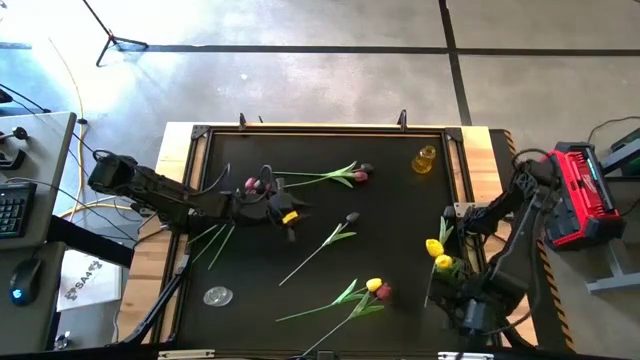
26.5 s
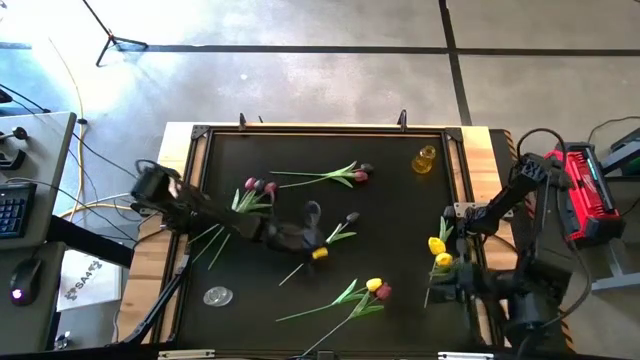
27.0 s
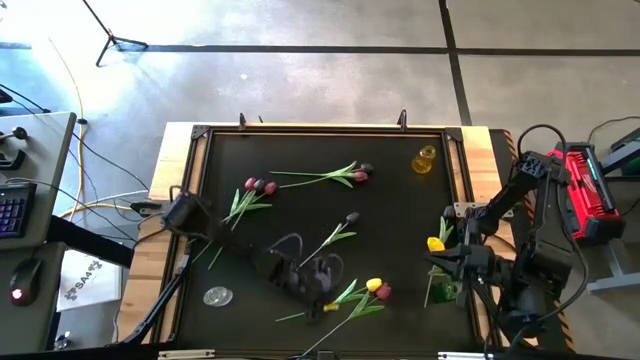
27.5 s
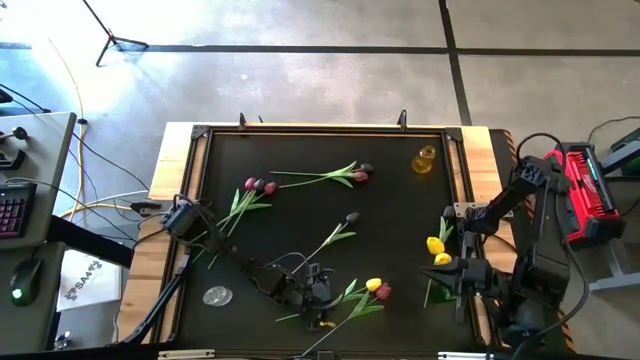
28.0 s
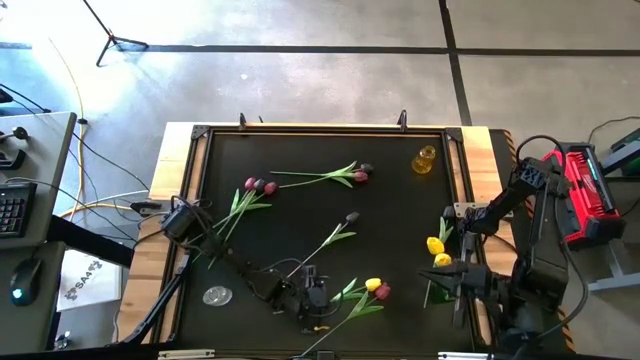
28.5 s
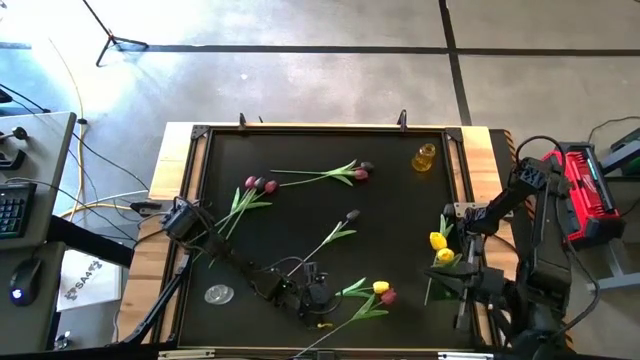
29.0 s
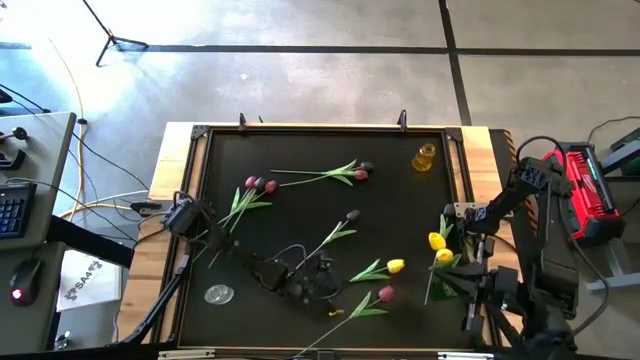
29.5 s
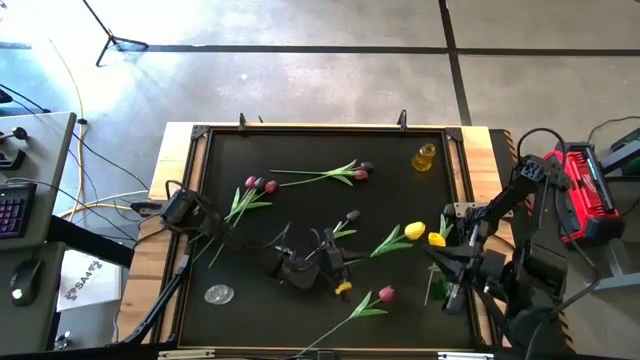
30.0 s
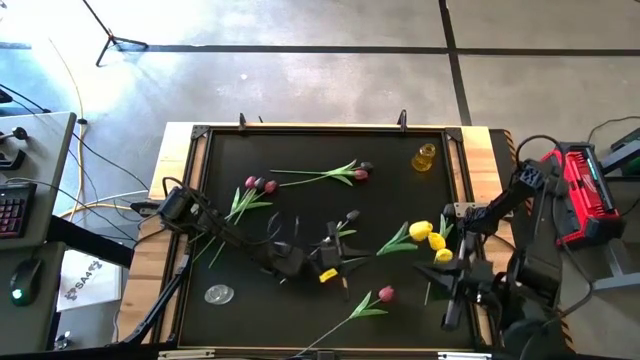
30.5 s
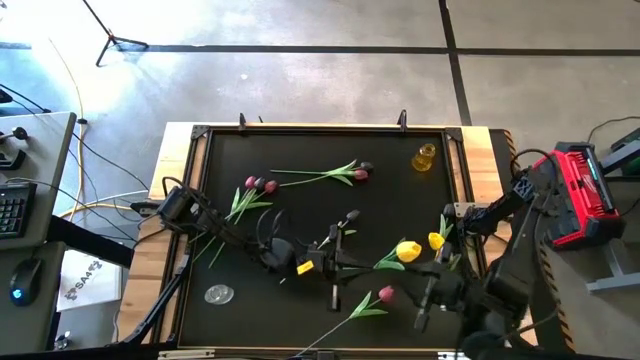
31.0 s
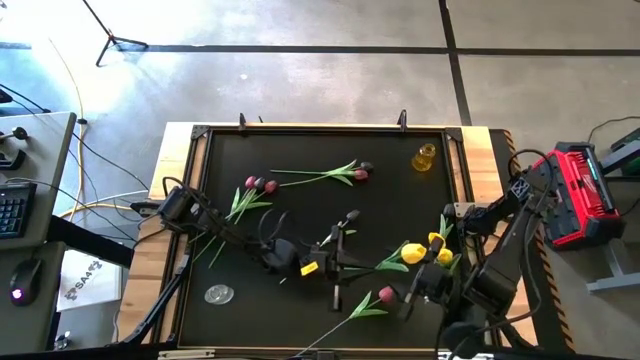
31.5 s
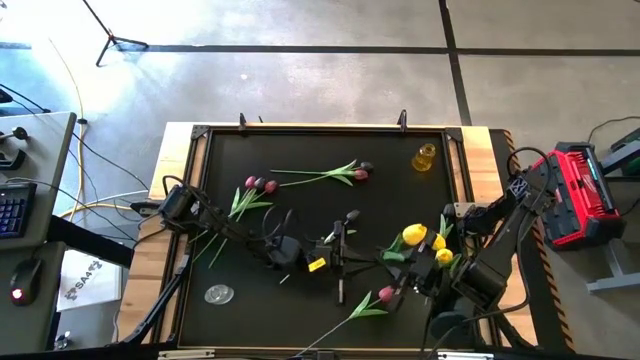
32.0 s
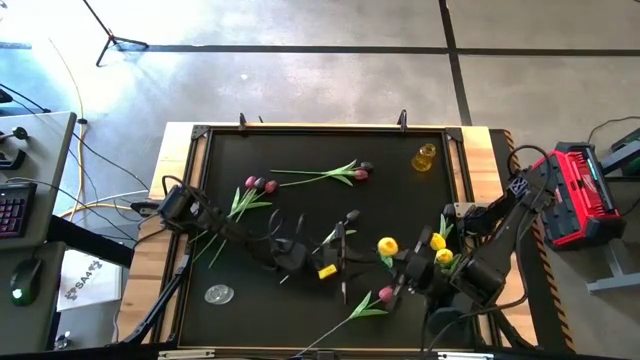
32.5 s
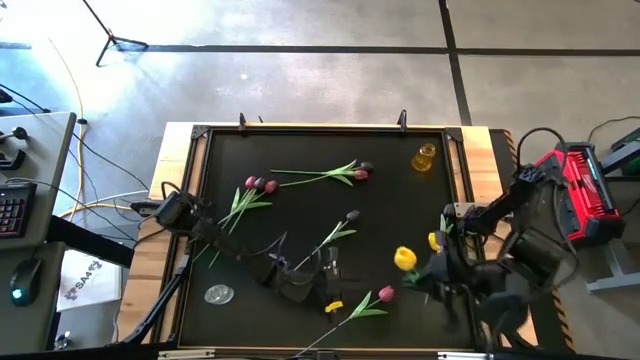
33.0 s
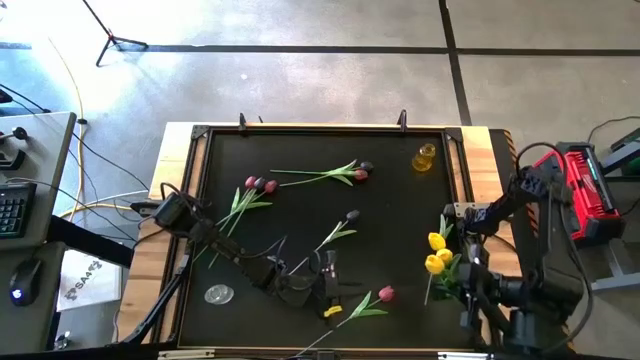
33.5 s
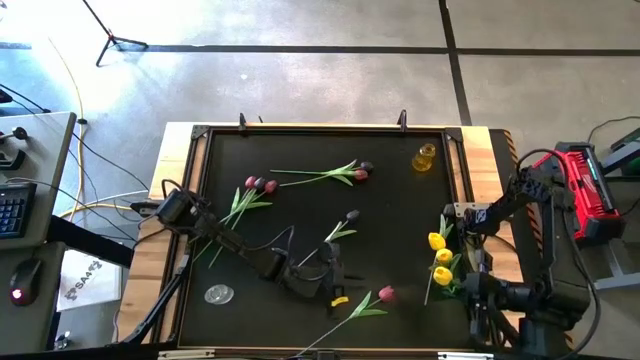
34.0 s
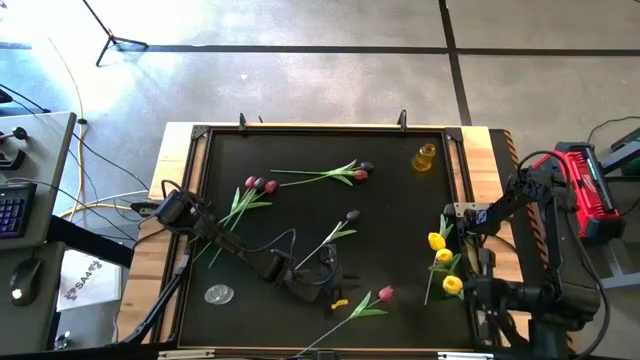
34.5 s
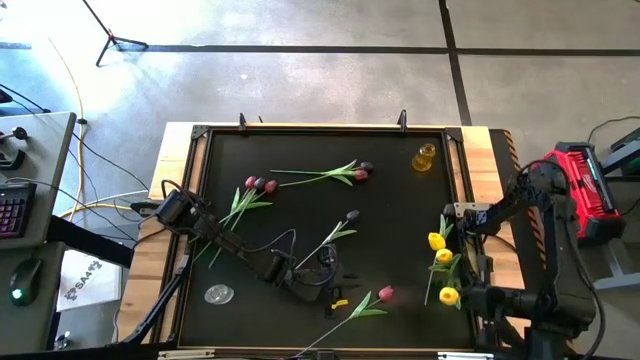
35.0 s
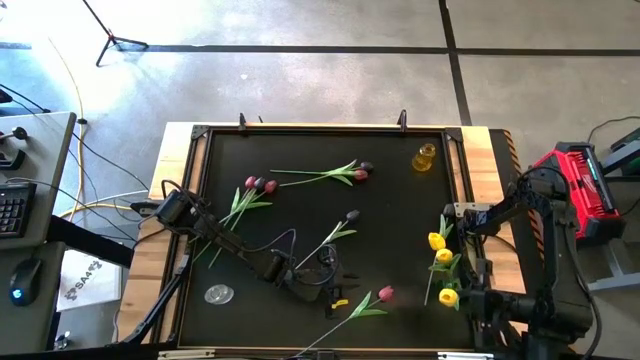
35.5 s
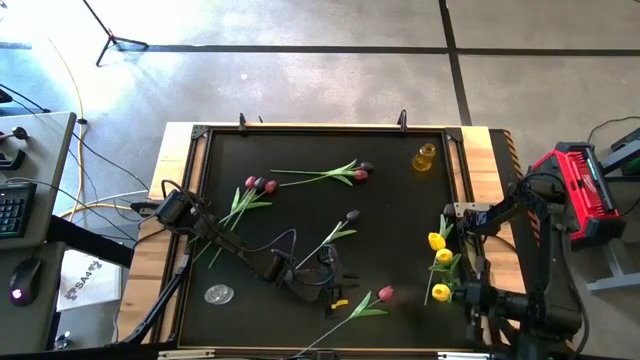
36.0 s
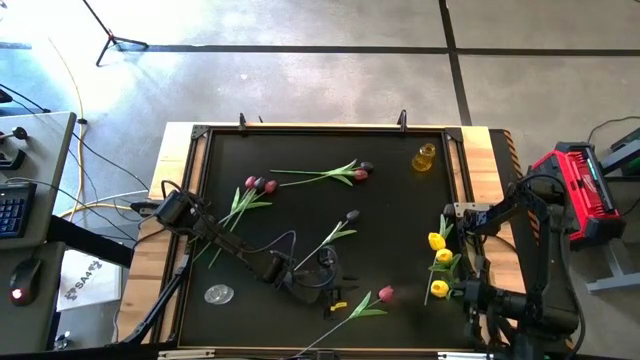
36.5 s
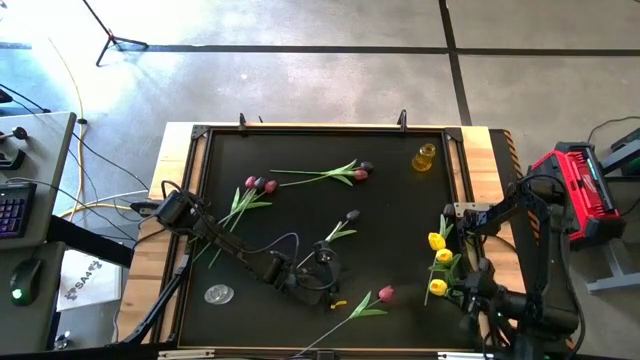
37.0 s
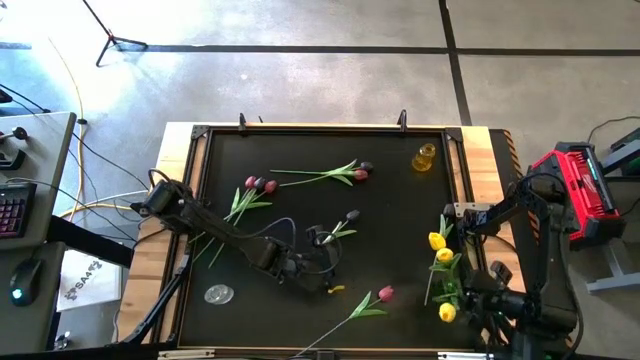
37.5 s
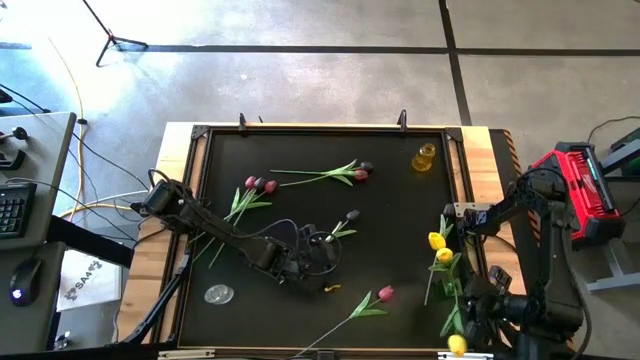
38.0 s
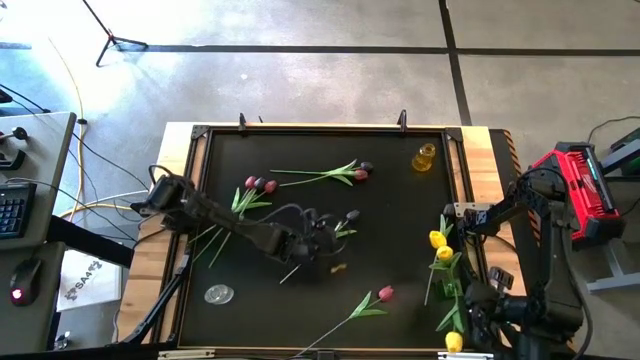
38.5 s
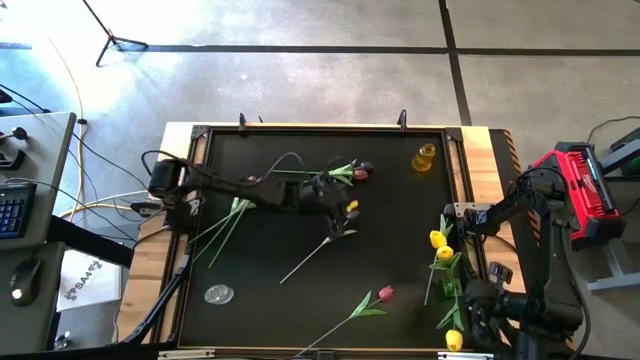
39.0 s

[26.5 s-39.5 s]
Task: Sort flowers into vase by color
Put the yellow flower into the green vase

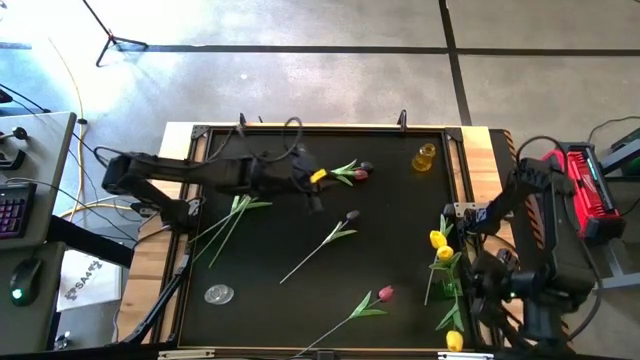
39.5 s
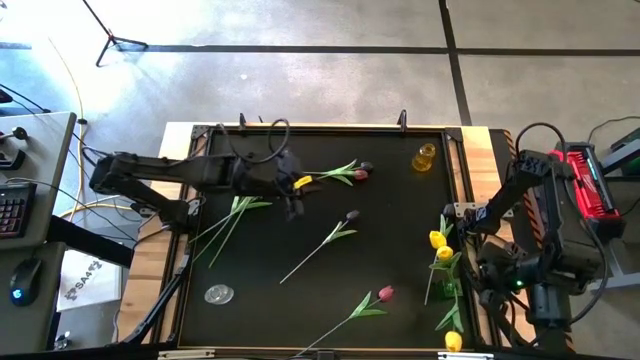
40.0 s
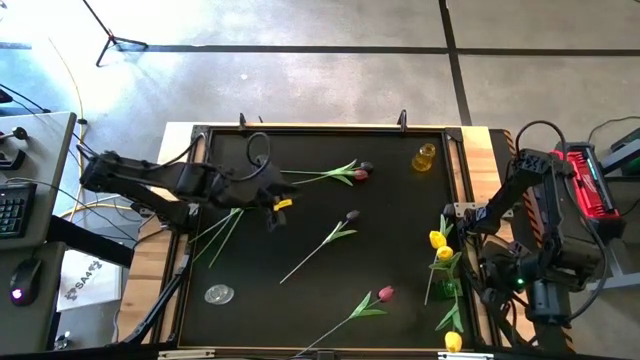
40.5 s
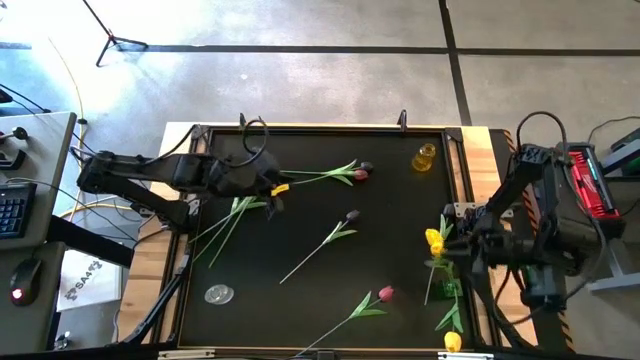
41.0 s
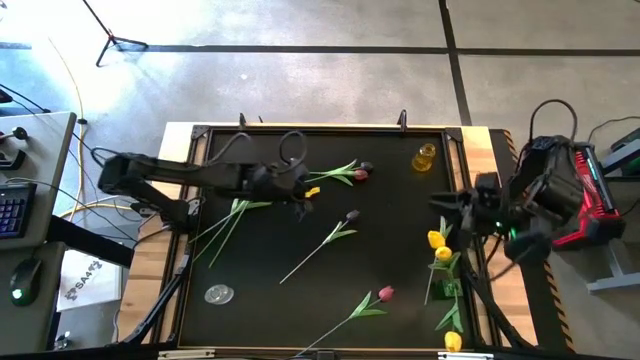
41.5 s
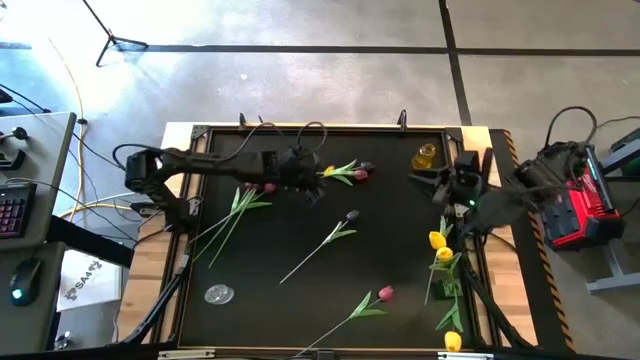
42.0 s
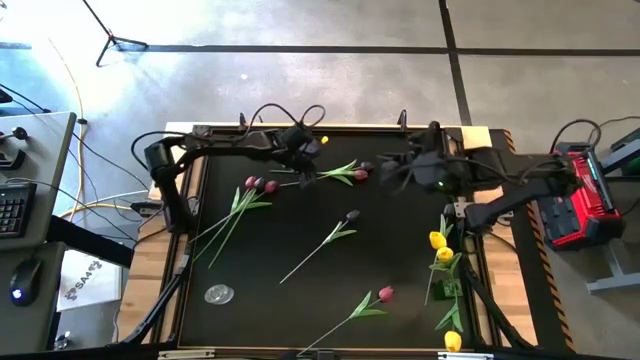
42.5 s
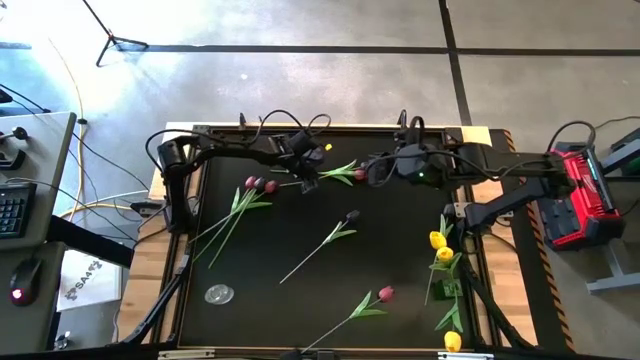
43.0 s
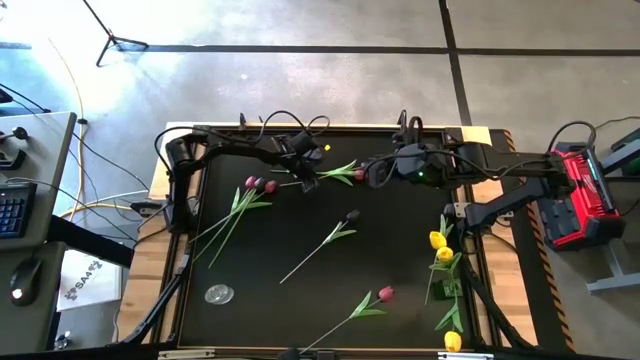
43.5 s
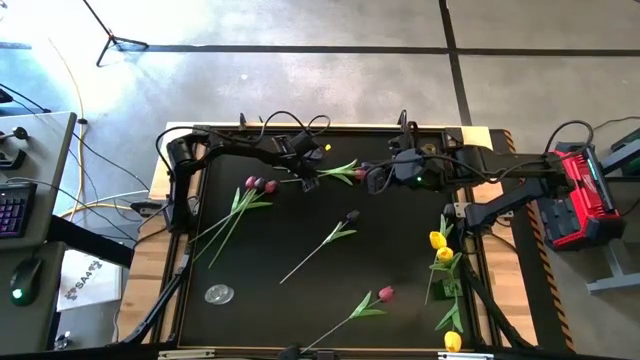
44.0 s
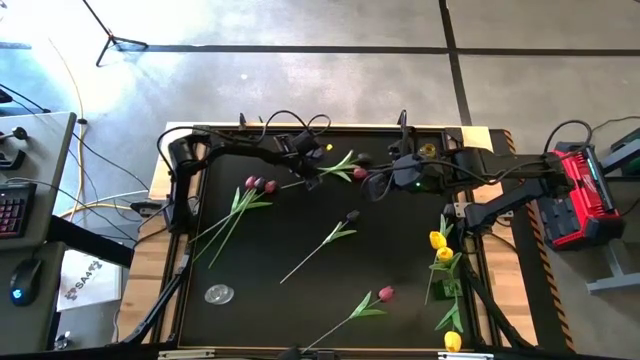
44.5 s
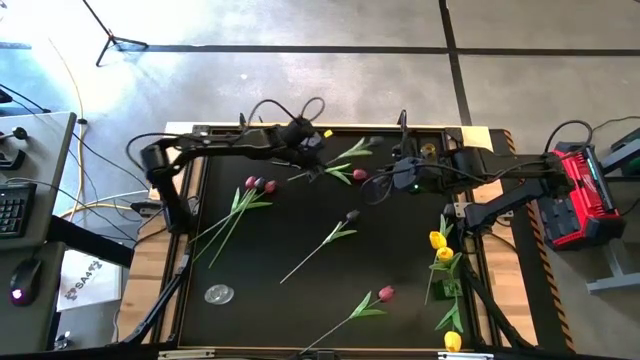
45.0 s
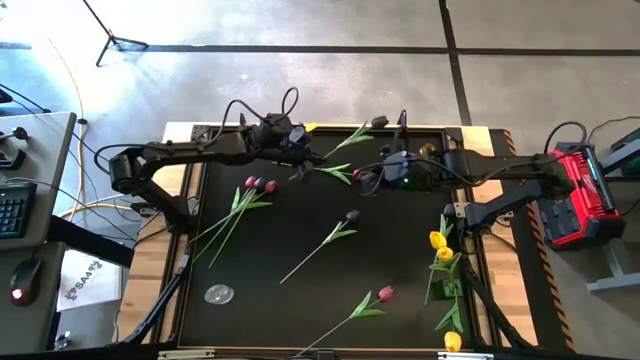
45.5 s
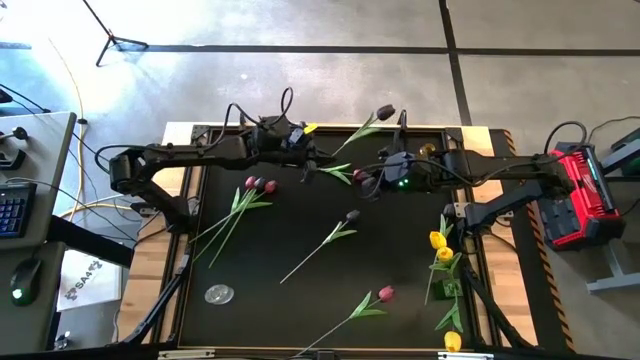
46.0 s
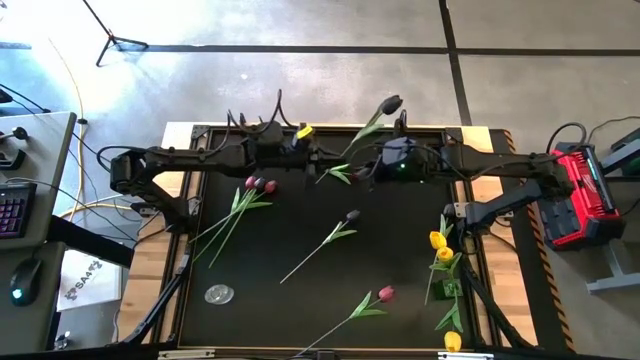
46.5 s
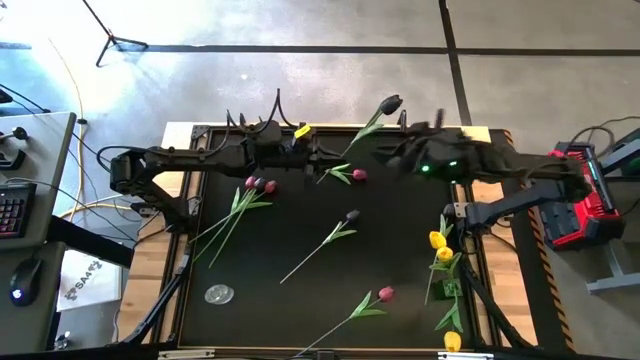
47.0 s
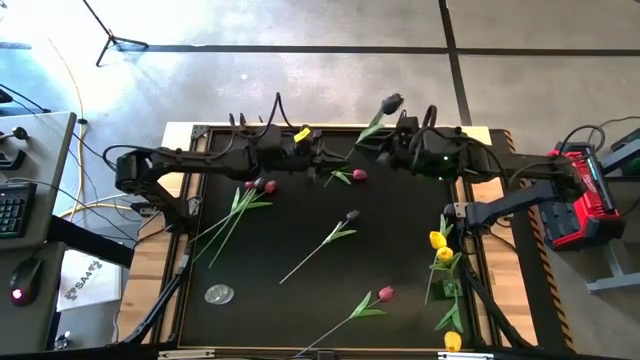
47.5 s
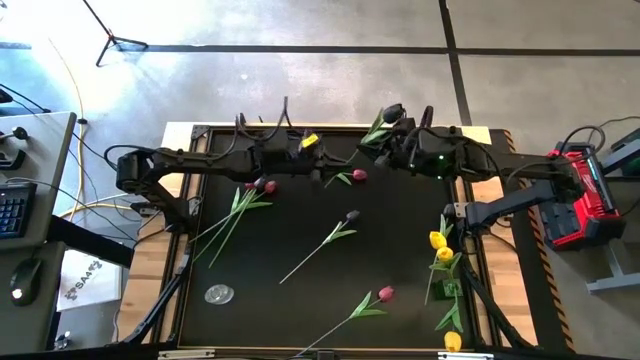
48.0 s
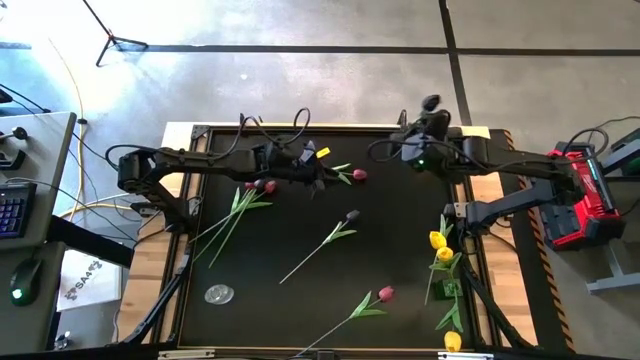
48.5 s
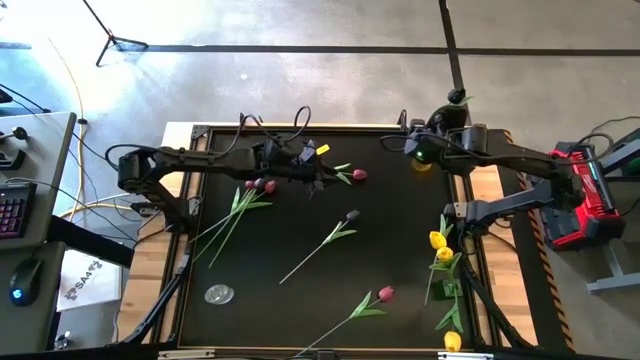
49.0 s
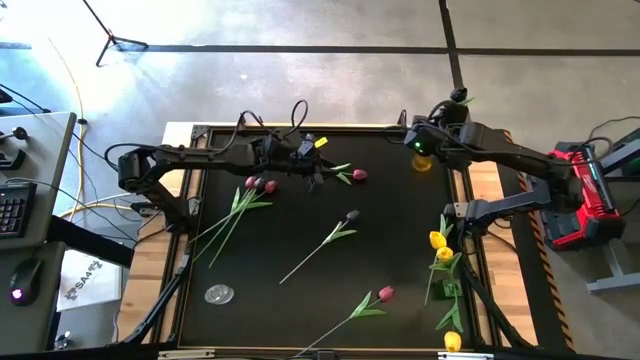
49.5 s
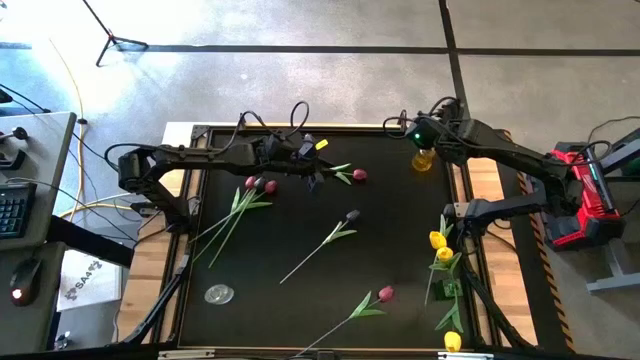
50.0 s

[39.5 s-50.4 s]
Put the top center black flower into the yellow vase
